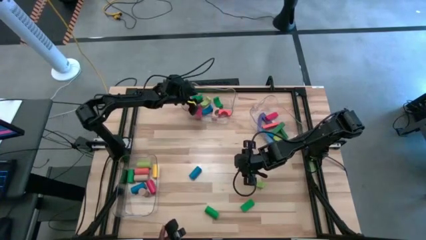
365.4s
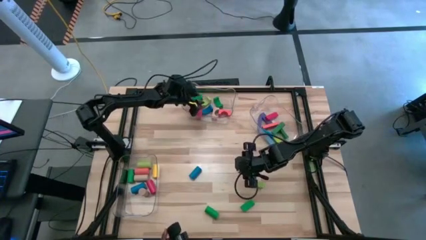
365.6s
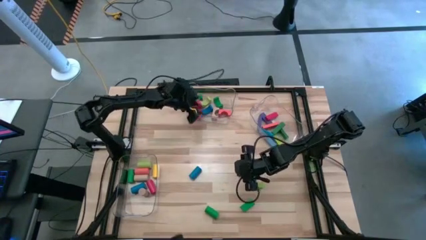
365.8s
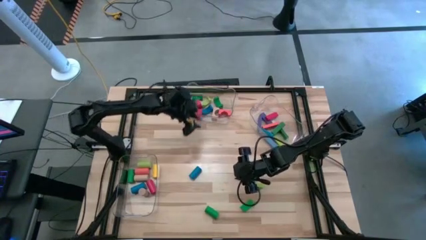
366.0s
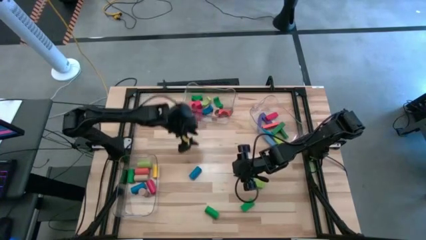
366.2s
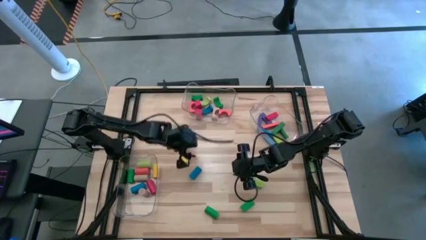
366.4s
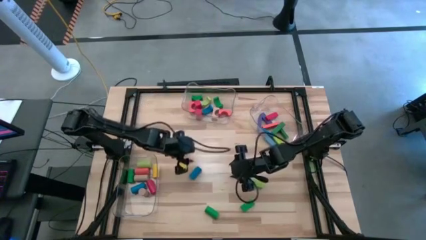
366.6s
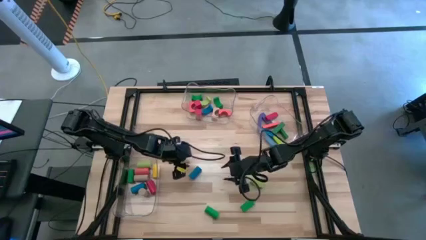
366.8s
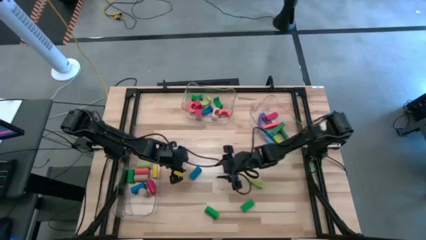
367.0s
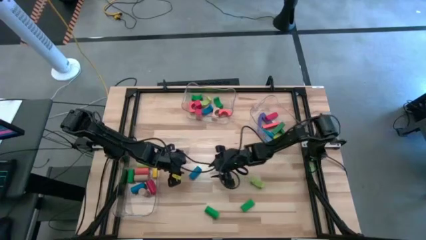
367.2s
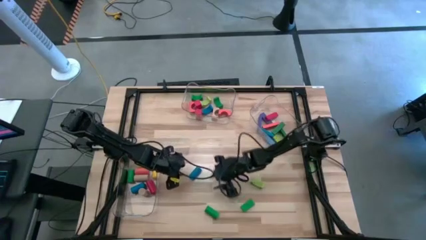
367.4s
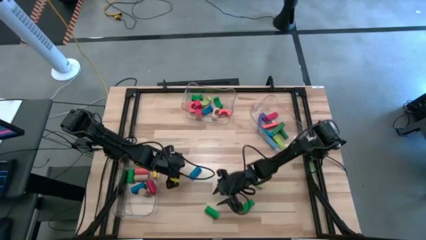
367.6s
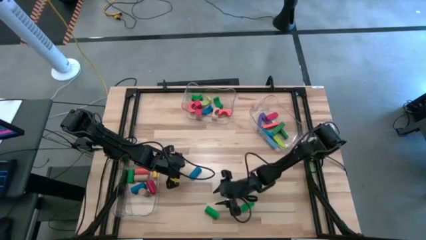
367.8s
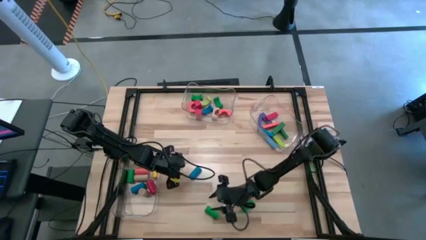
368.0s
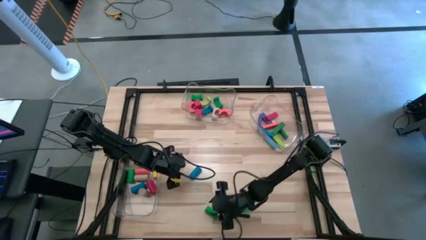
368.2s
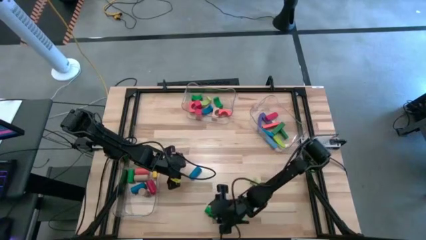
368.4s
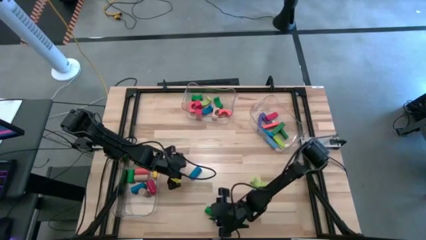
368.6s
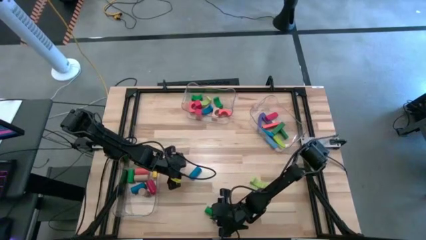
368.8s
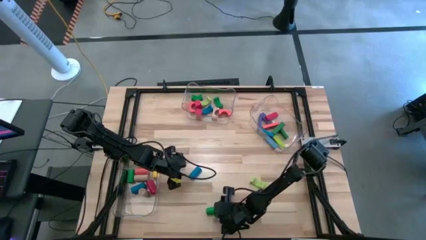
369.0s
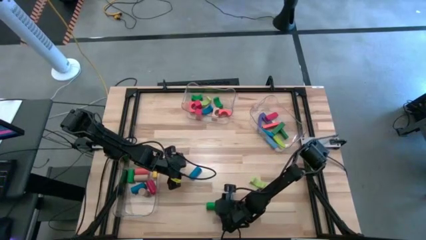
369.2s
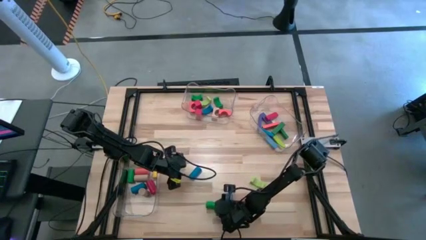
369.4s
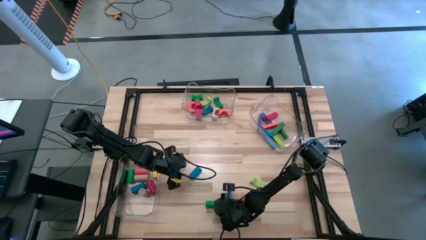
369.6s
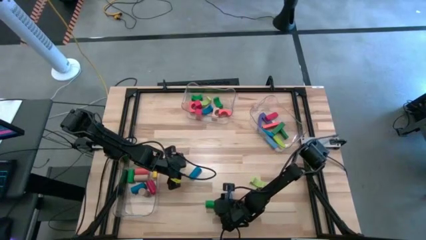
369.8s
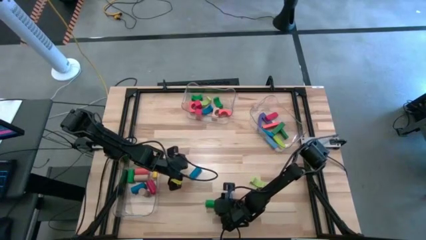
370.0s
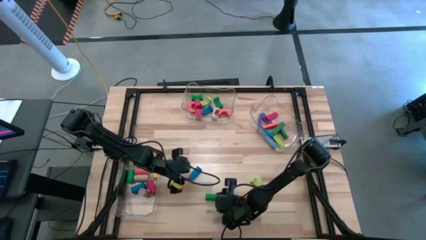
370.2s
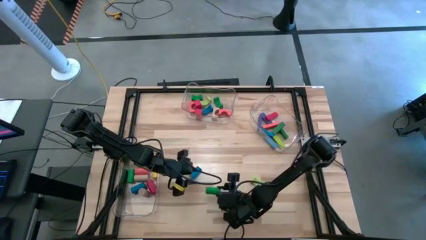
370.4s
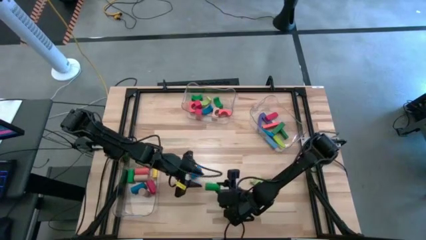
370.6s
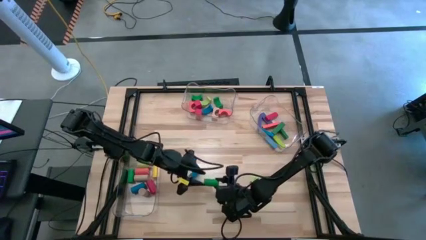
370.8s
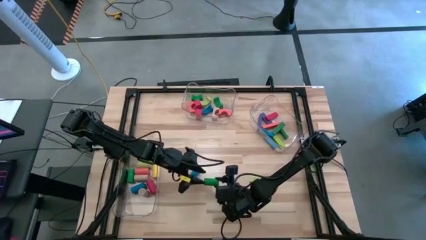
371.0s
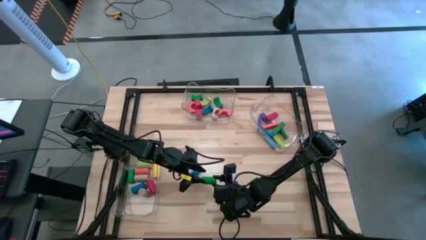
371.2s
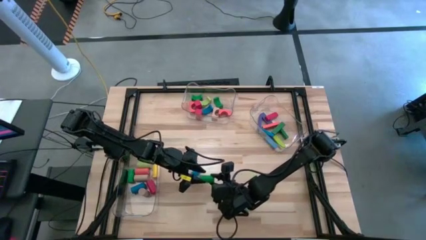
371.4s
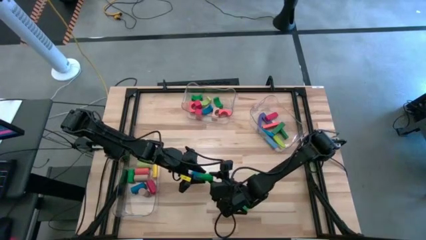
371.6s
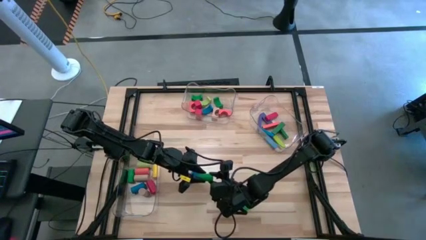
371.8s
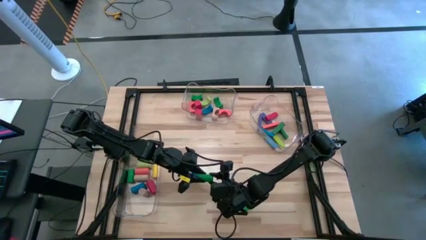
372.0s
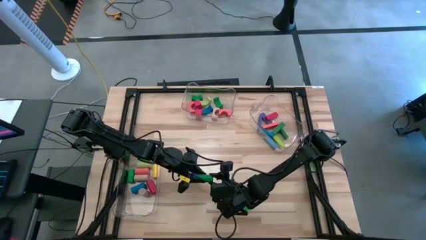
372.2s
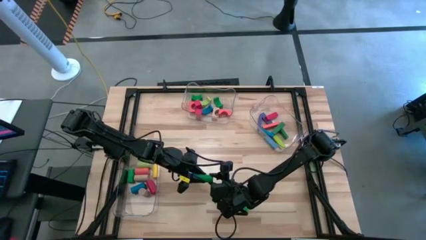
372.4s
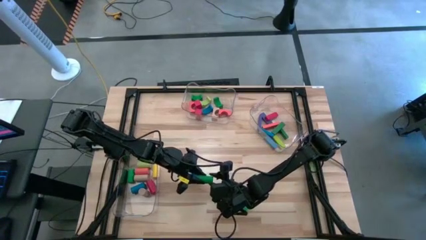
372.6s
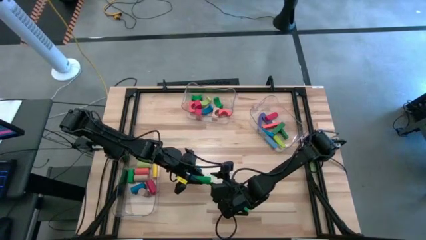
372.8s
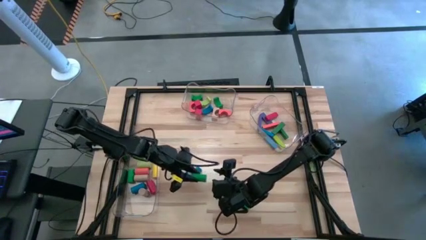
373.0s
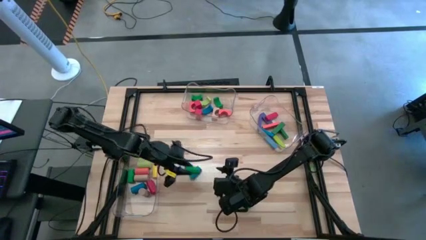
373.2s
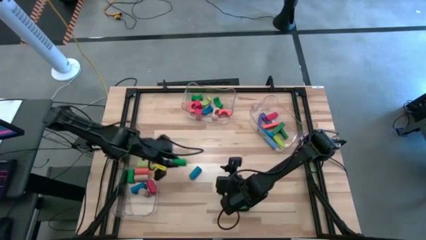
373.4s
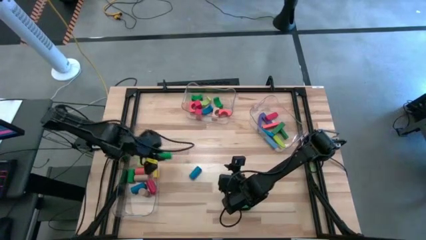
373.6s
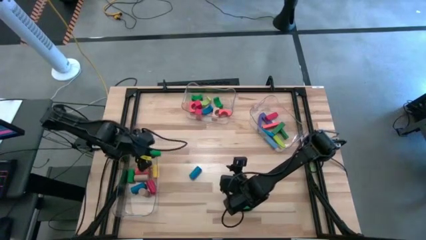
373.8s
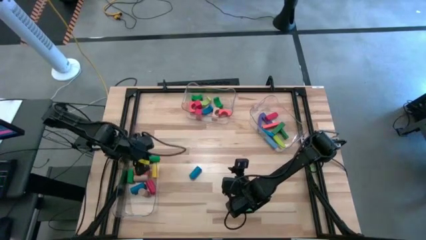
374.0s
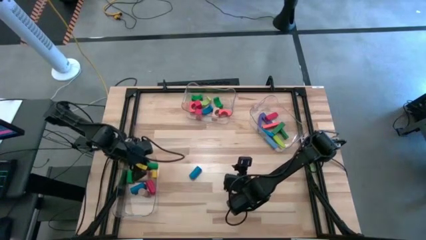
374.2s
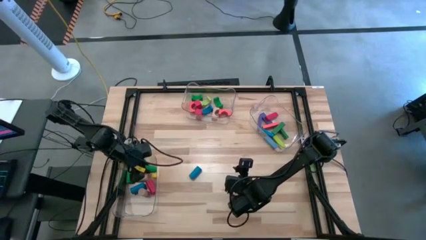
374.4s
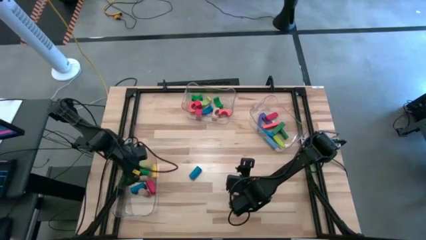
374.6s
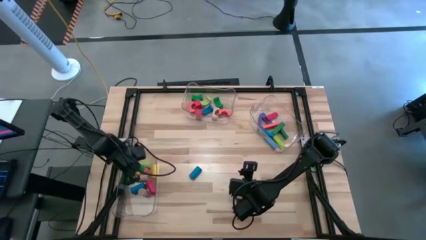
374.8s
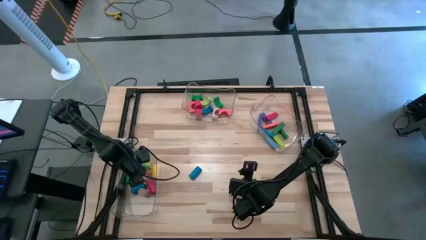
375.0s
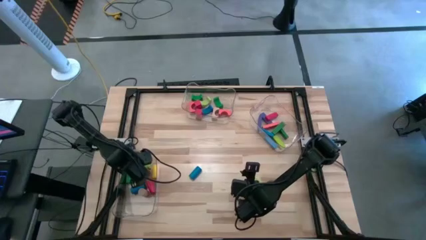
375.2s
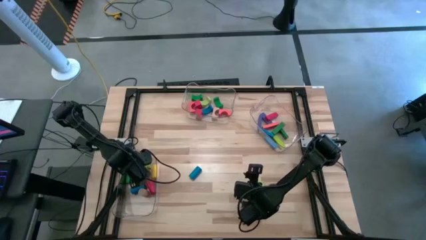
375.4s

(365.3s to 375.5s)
Task: Sort blocks by size
Put the green cylindrical block into the left transparent bin
